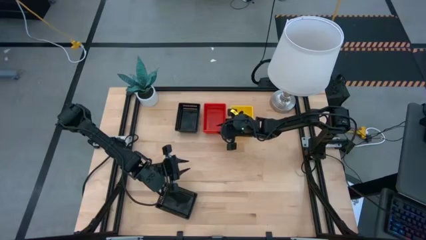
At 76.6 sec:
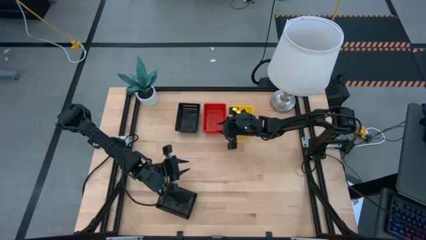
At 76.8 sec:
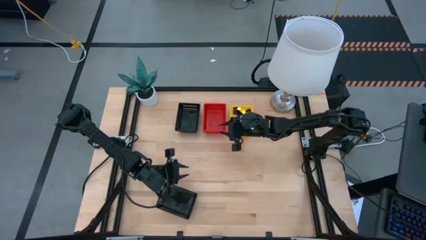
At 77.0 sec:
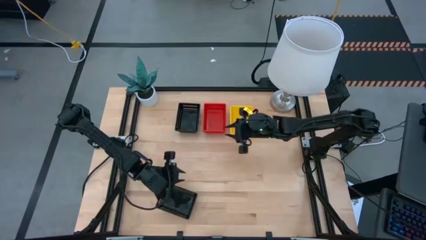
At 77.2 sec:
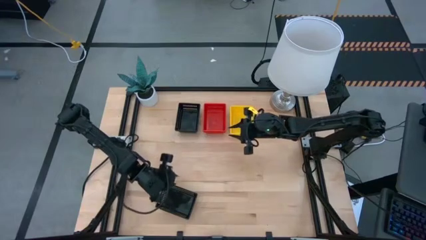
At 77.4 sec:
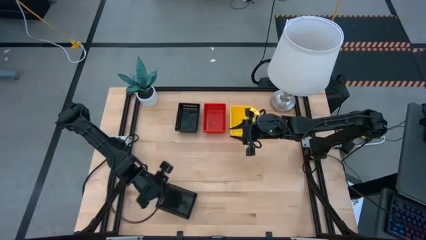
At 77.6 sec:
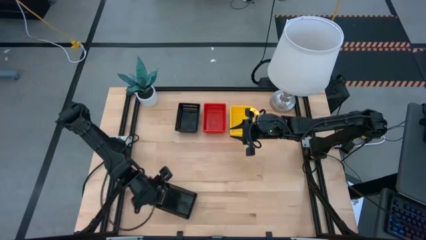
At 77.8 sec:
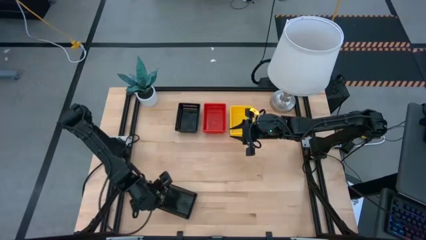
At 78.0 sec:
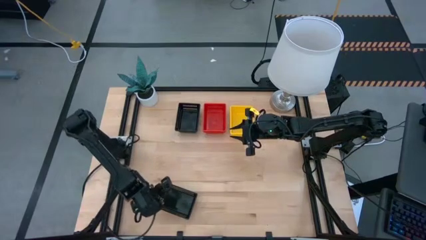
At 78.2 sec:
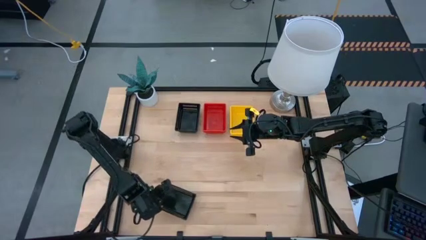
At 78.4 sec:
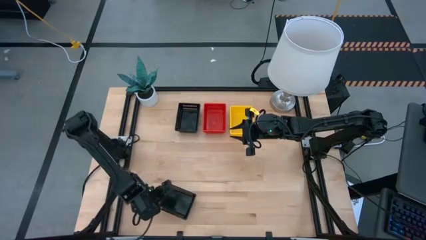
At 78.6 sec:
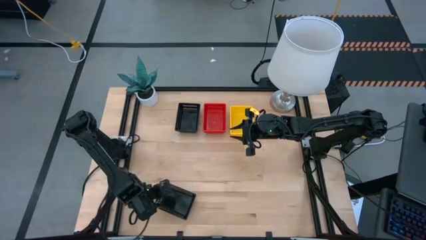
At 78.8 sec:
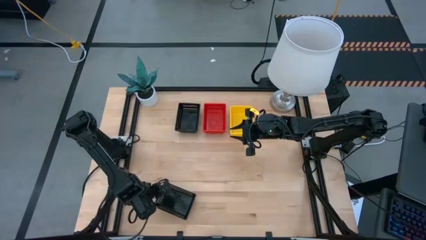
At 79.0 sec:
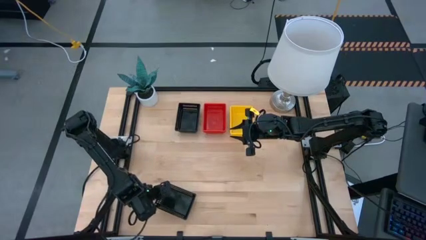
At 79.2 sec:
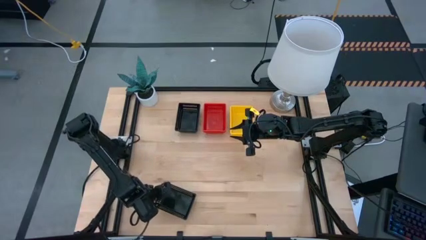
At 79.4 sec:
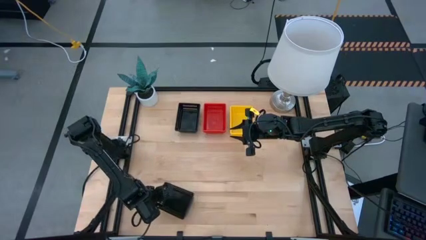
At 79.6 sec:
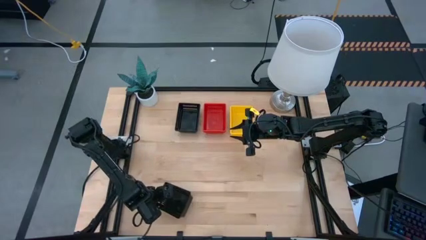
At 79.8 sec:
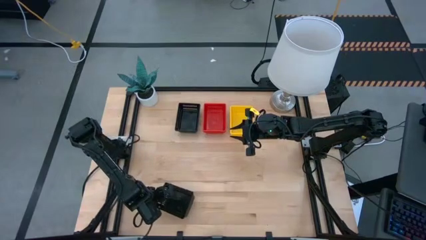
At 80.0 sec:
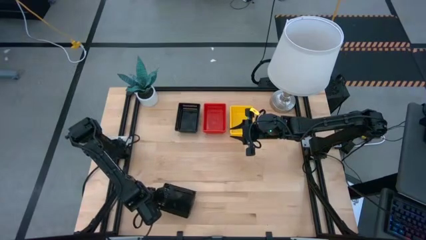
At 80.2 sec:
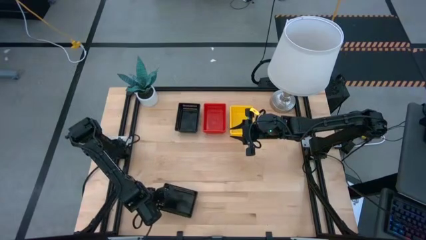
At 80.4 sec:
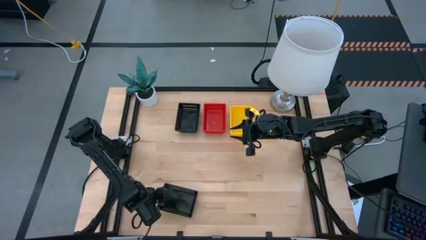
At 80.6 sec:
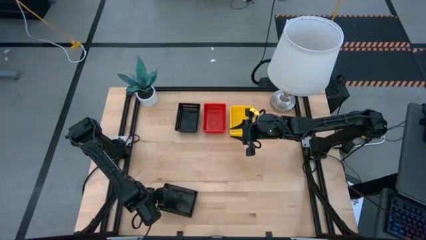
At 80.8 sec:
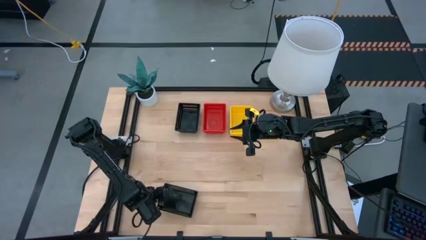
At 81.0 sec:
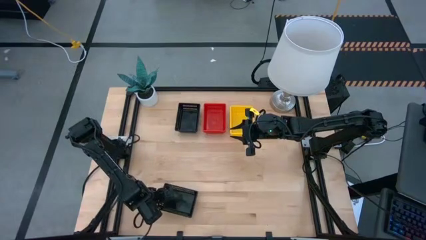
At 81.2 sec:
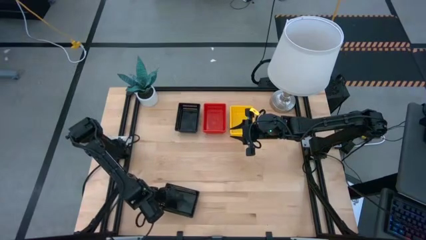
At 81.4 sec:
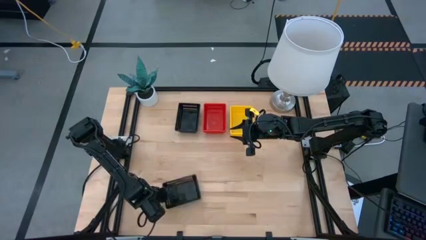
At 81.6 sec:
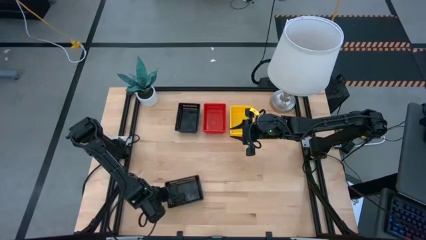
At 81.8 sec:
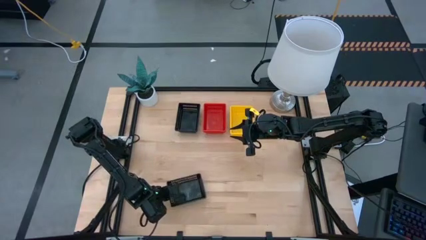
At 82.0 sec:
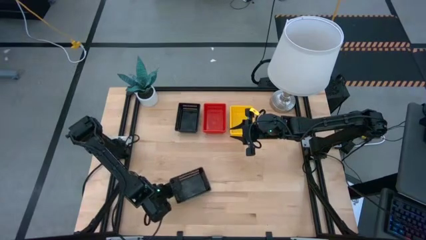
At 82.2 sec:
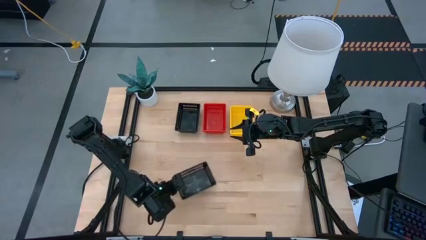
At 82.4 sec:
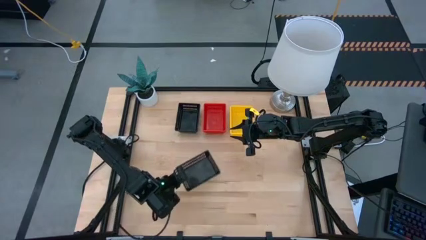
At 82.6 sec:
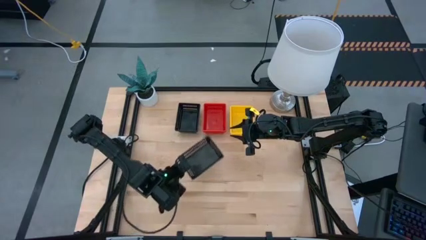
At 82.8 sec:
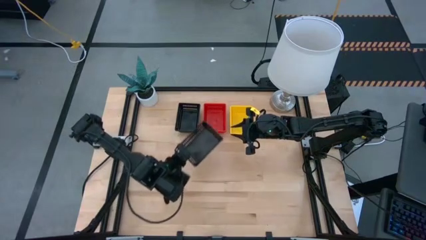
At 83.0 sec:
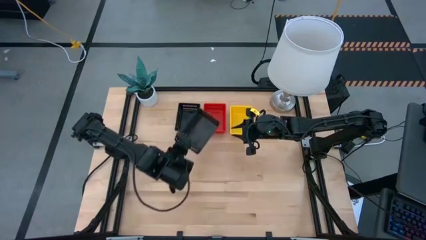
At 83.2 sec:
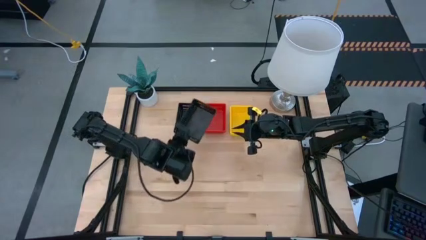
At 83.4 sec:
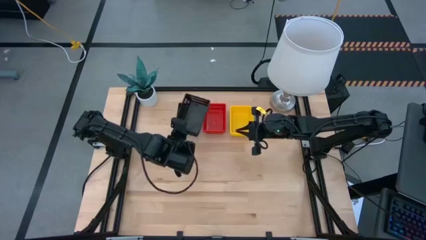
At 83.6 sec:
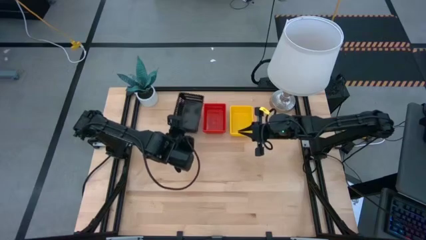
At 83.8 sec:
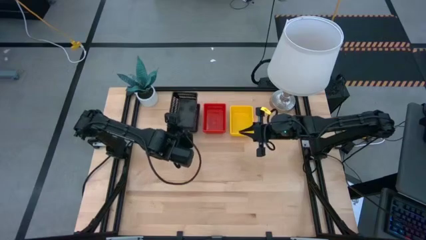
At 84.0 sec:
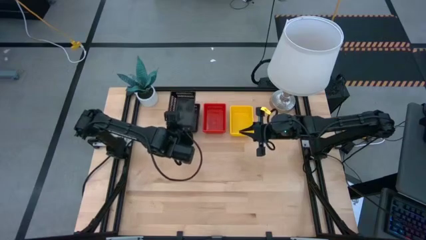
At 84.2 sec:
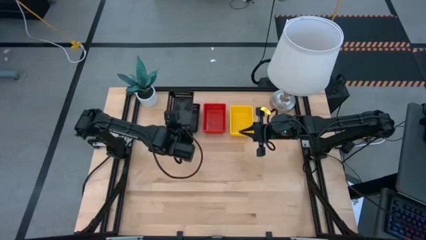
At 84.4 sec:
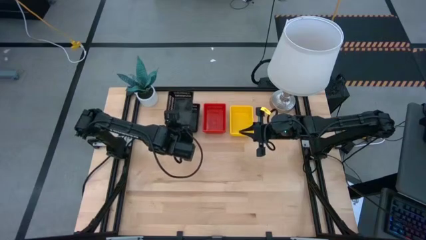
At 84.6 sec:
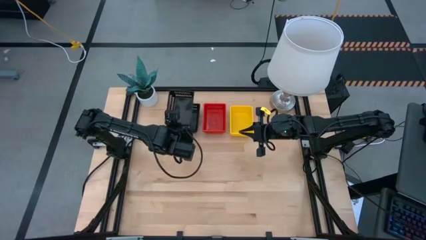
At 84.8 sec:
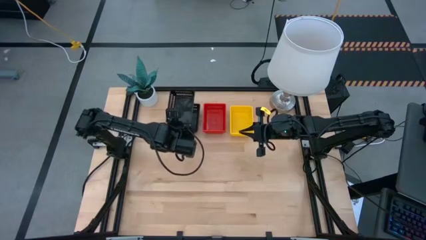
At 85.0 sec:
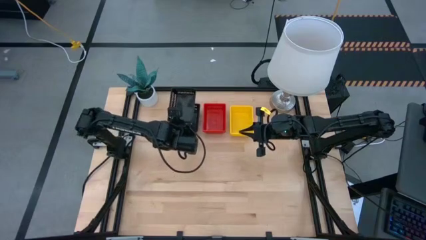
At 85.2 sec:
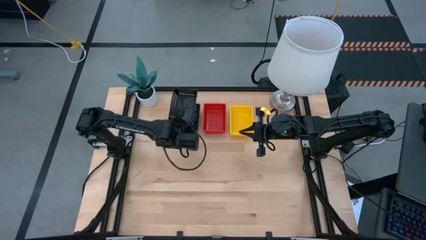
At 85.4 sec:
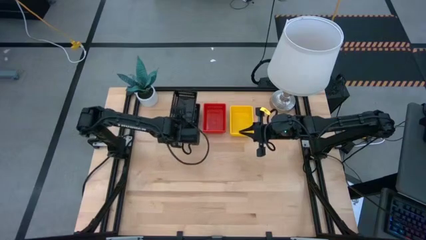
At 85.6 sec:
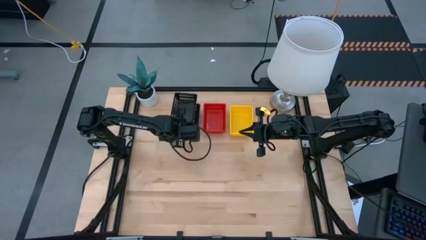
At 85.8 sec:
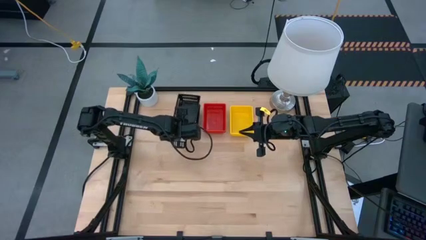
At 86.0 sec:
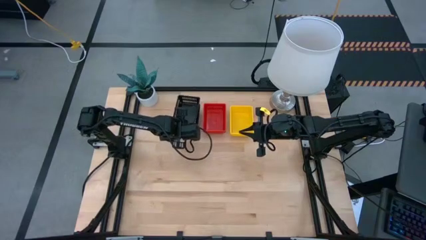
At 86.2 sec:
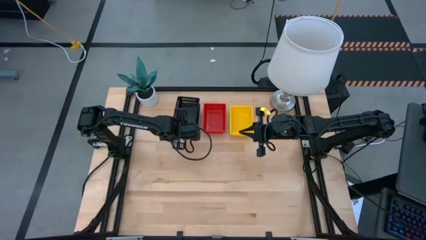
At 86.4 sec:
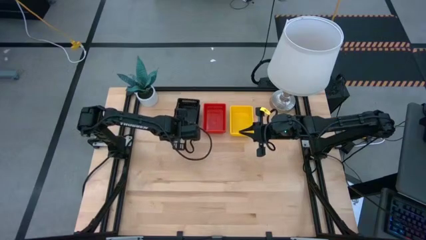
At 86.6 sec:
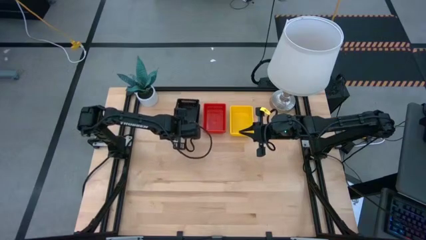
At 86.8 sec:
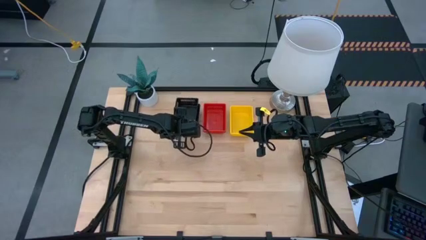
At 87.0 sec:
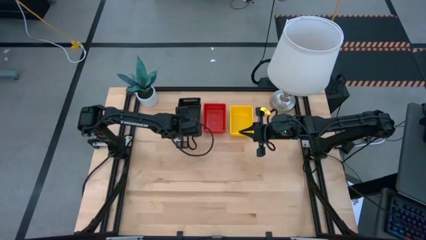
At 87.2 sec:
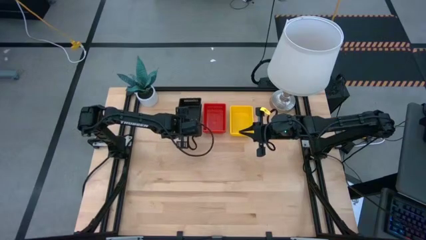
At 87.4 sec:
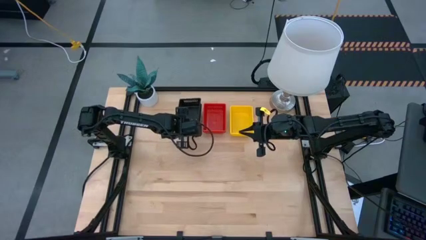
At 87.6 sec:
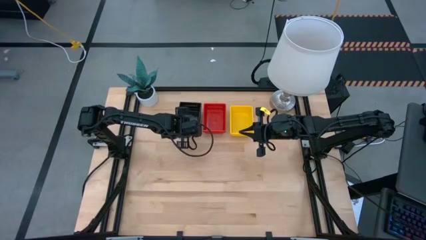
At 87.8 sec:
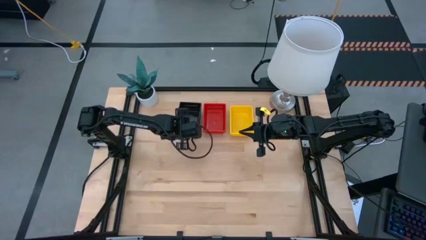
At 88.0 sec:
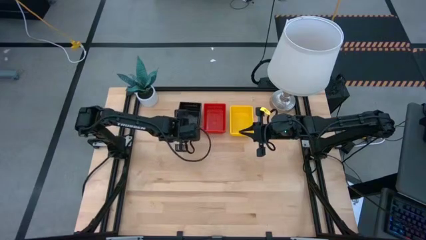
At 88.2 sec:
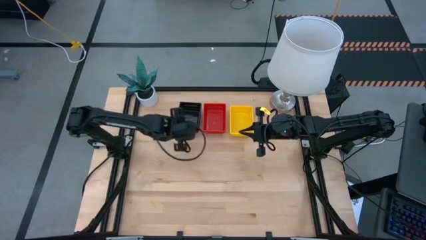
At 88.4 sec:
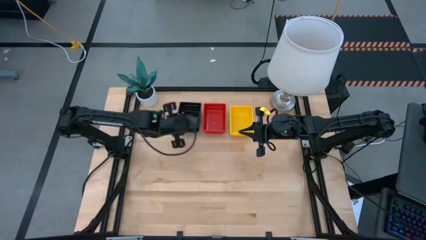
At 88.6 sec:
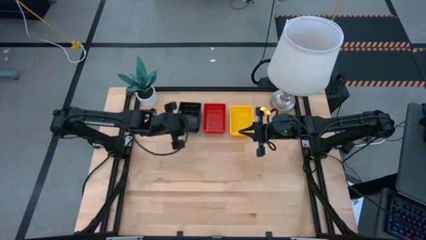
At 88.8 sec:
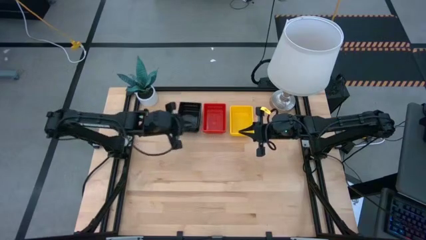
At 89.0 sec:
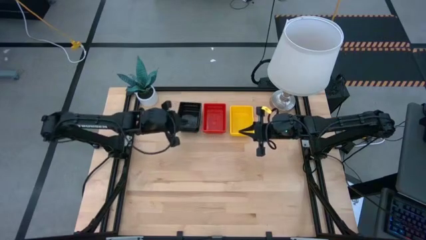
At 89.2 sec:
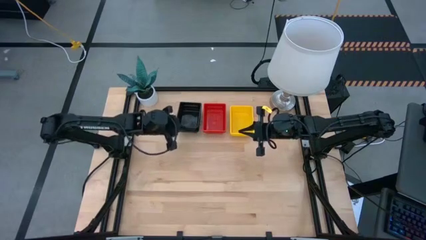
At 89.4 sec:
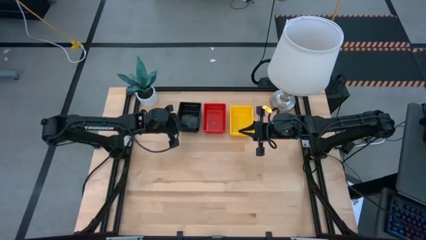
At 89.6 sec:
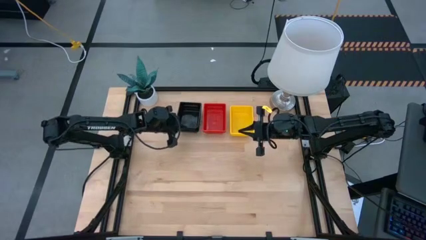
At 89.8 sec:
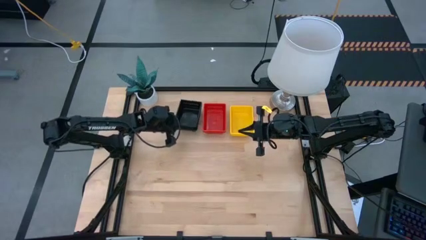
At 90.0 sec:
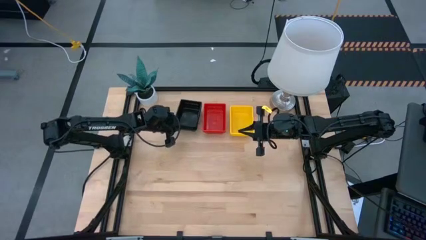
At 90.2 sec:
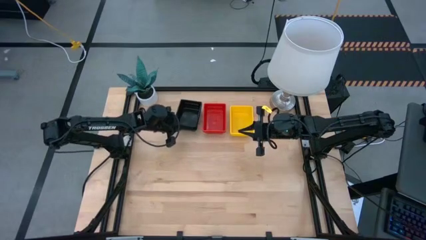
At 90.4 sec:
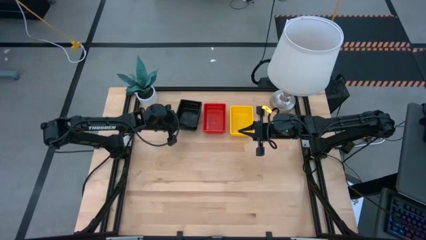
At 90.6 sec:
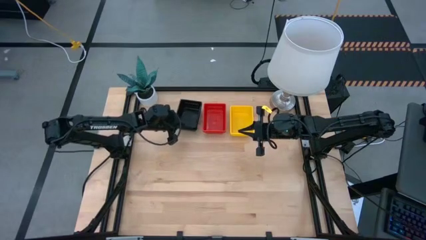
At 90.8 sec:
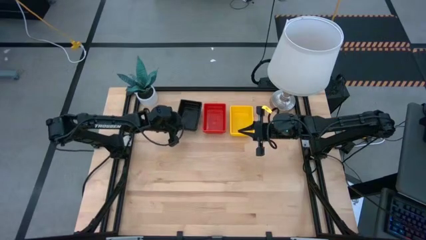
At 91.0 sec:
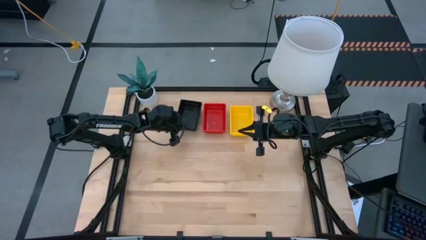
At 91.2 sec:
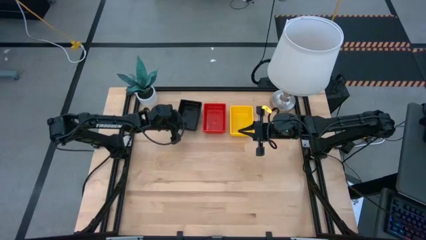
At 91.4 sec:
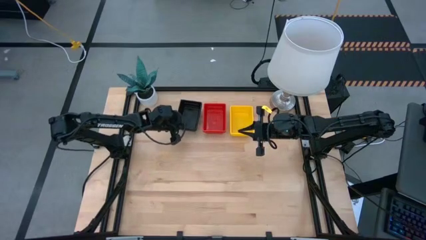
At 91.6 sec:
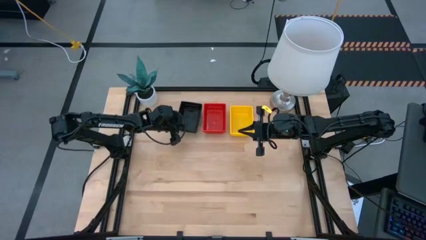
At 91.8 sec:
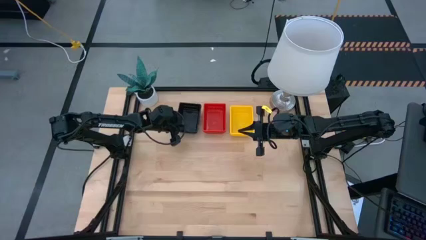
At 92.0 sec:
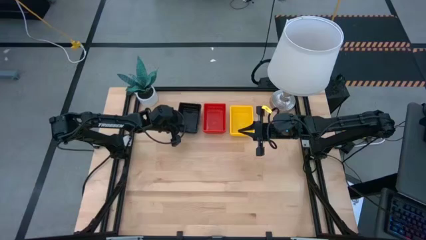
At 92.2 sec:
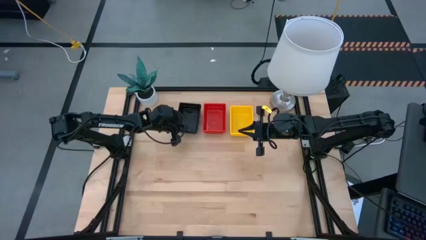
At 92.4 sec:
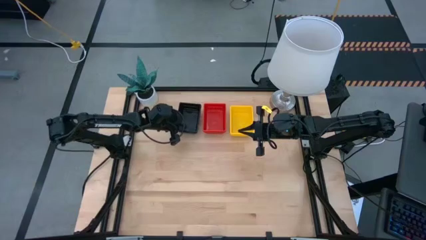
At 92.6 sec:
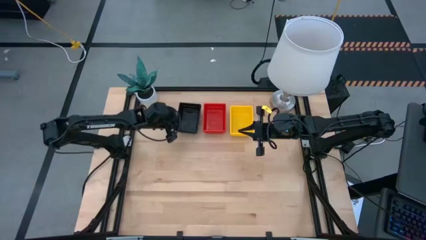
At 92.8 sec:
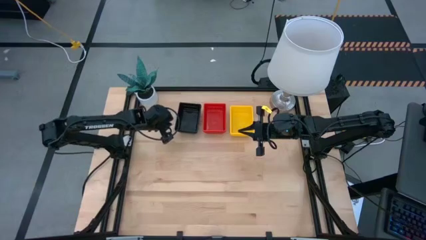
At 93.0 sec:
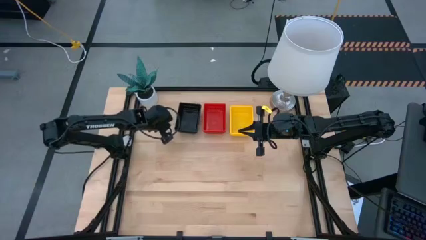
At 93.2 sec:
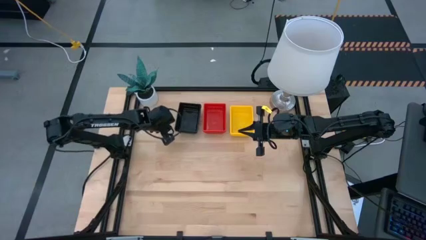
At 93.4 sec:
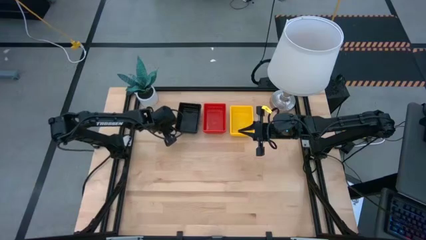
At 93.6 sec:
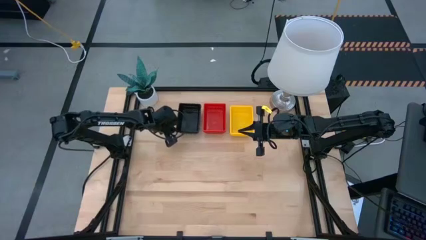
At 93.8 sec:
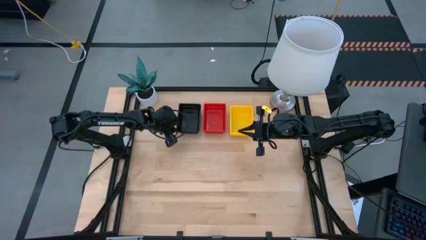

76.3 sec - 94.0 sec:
Stack the bottom black bin on the stacked black bins
